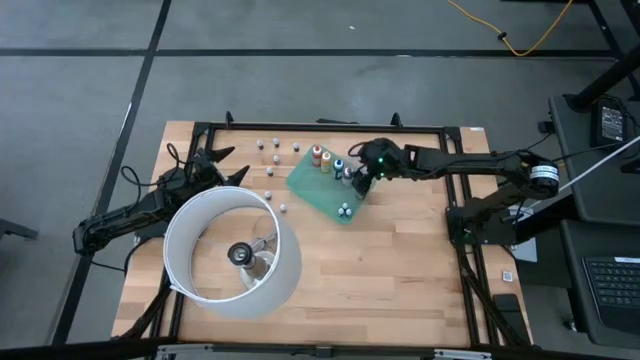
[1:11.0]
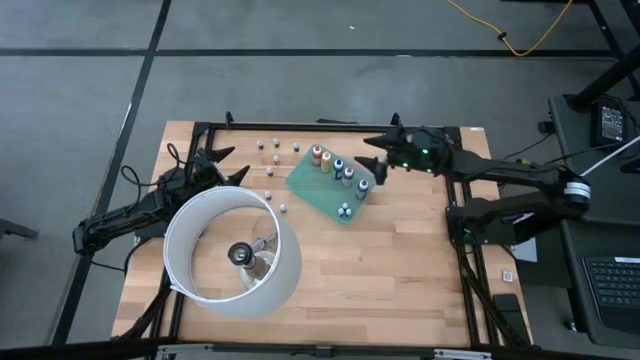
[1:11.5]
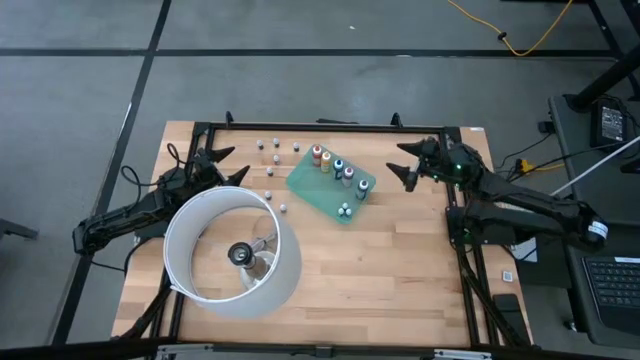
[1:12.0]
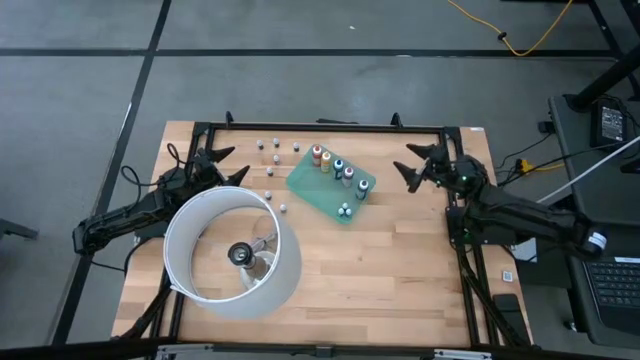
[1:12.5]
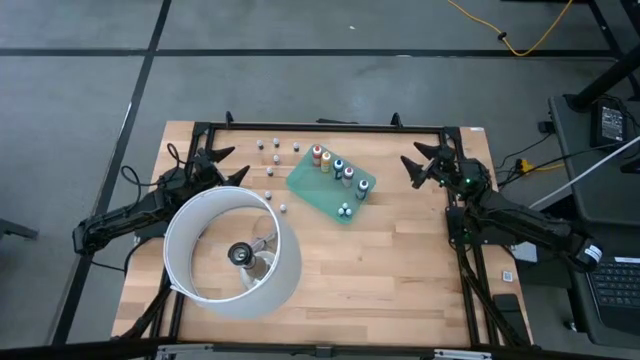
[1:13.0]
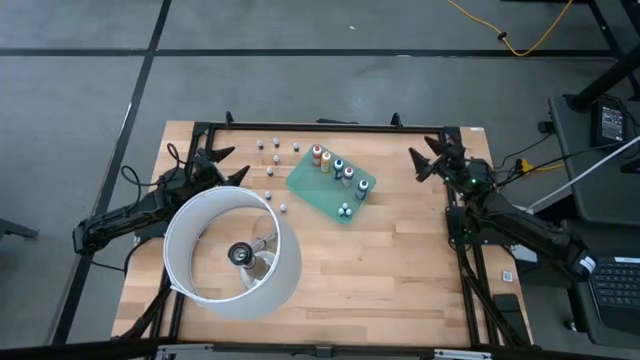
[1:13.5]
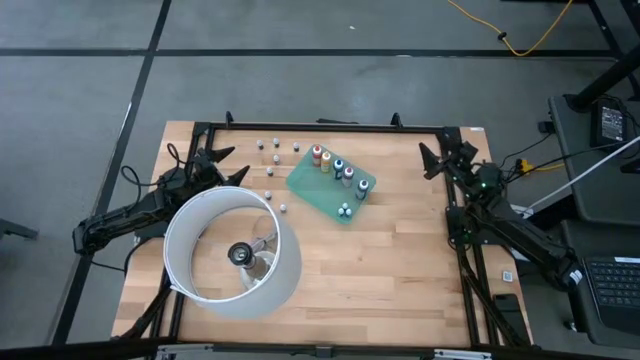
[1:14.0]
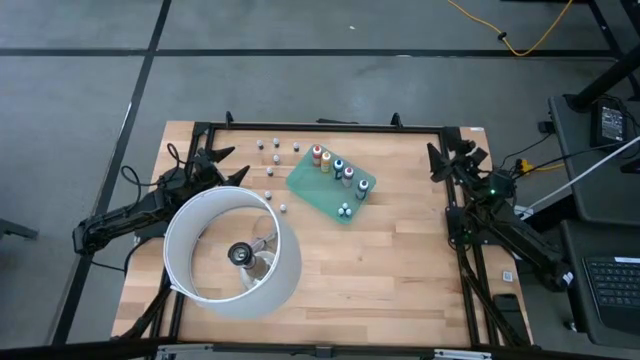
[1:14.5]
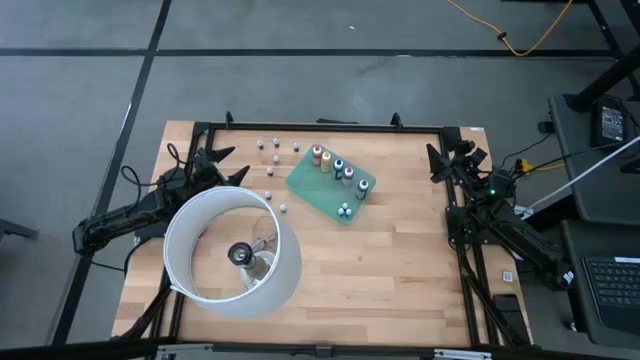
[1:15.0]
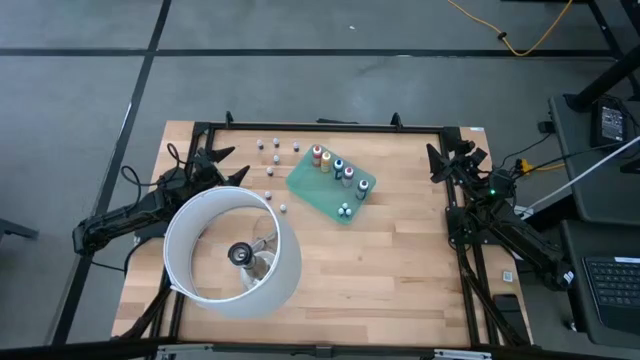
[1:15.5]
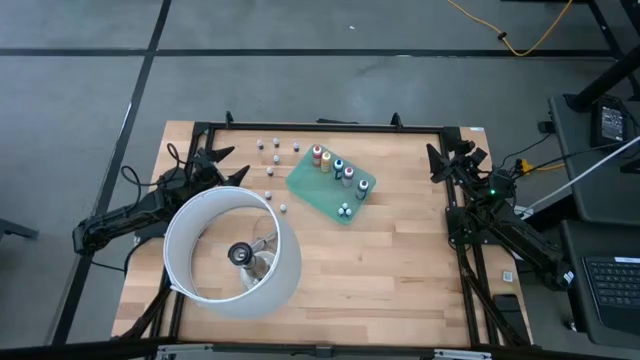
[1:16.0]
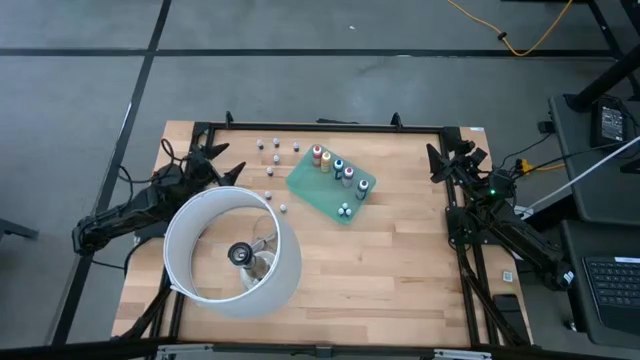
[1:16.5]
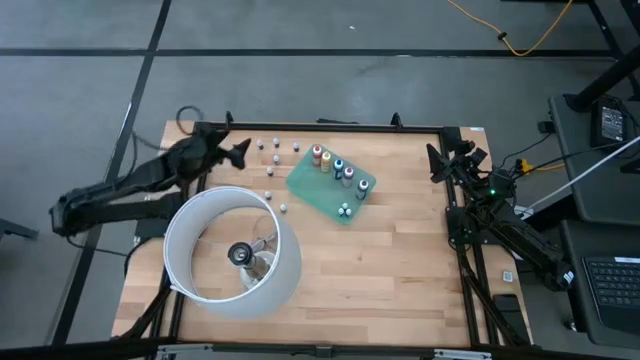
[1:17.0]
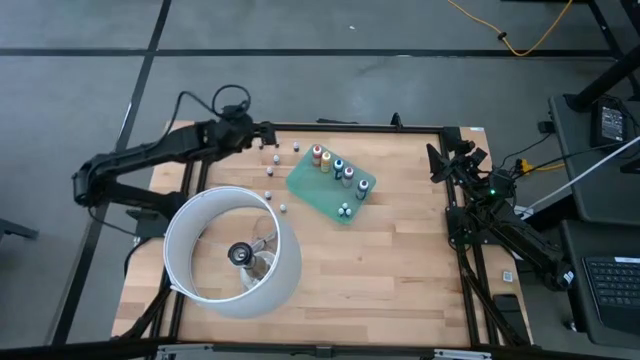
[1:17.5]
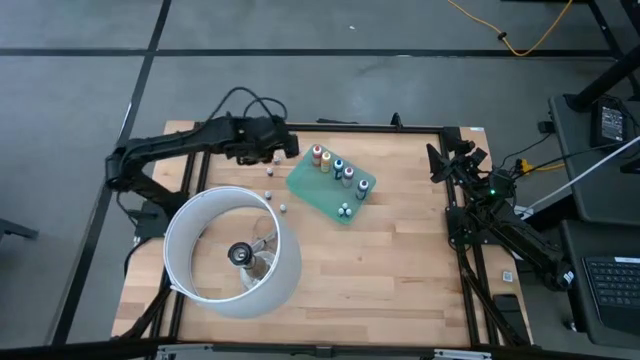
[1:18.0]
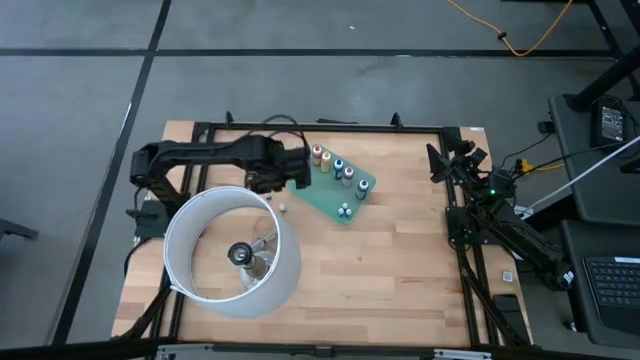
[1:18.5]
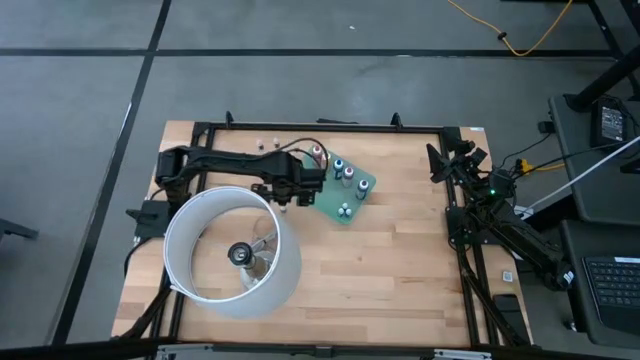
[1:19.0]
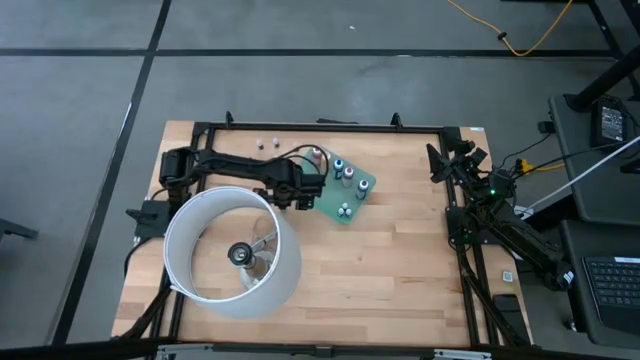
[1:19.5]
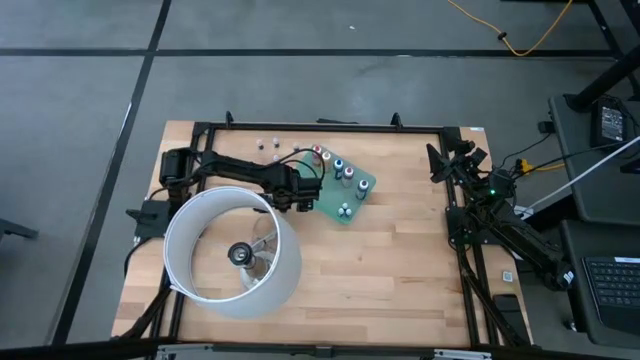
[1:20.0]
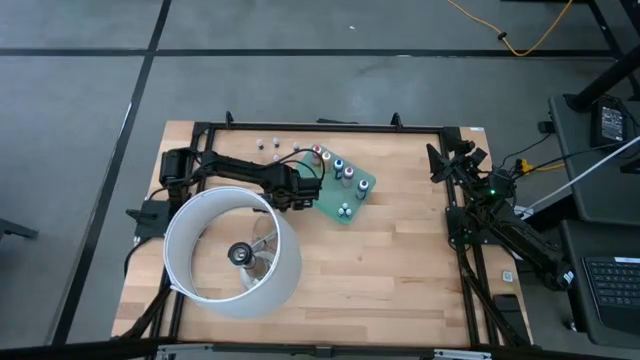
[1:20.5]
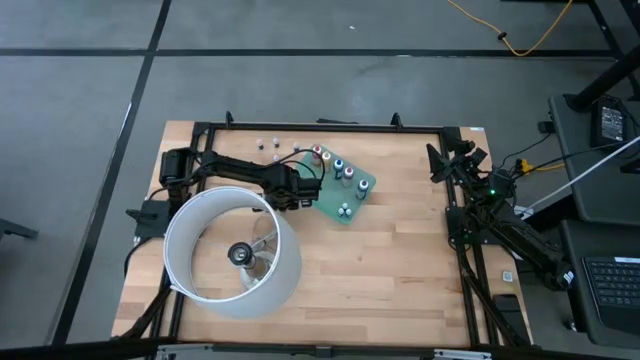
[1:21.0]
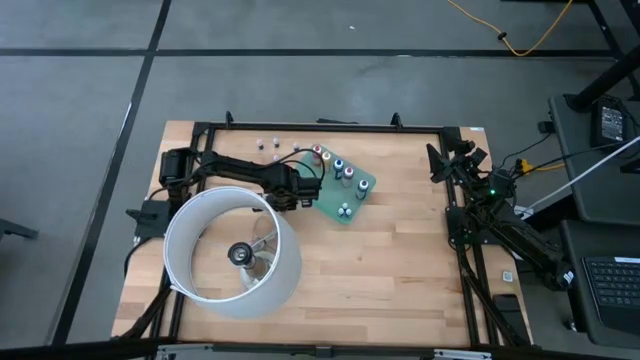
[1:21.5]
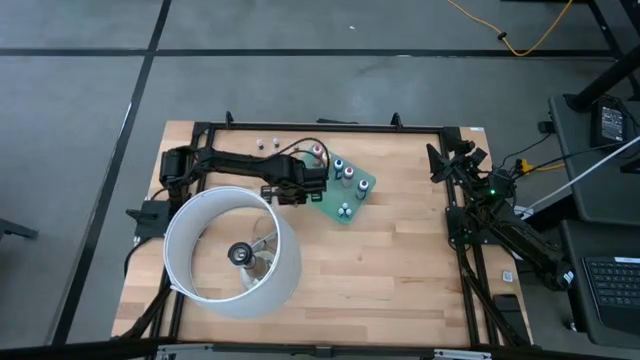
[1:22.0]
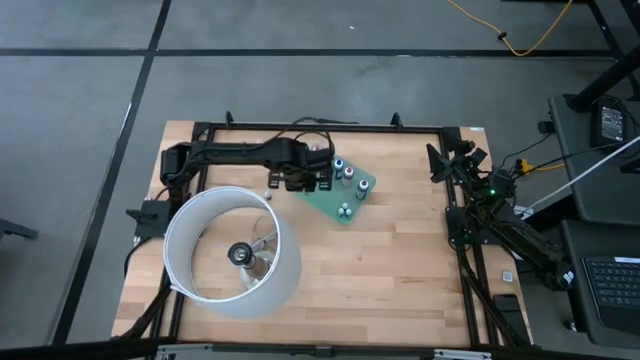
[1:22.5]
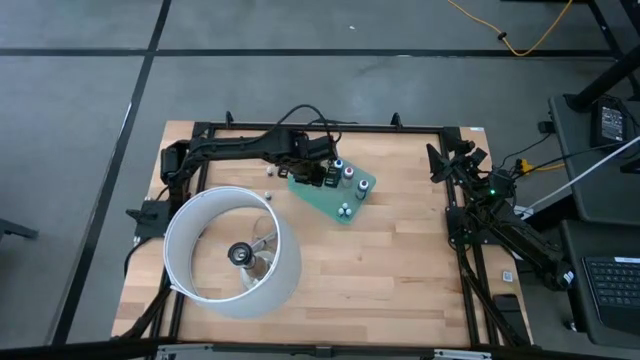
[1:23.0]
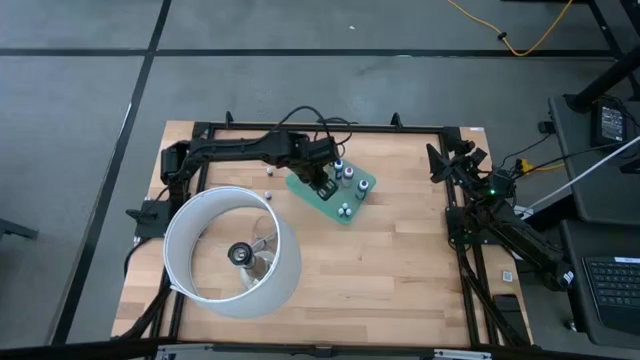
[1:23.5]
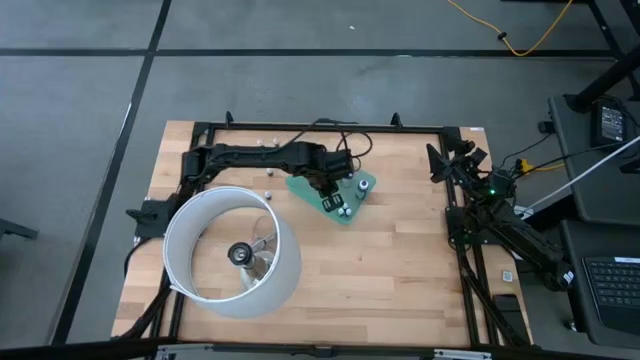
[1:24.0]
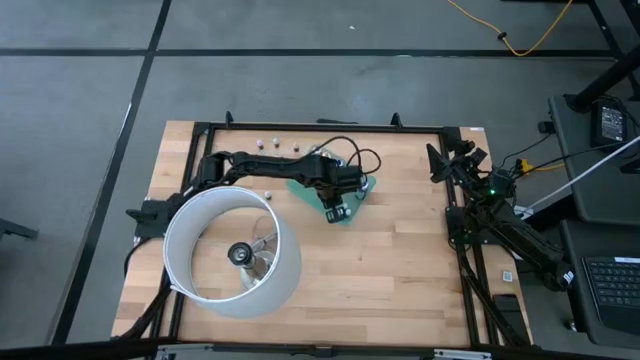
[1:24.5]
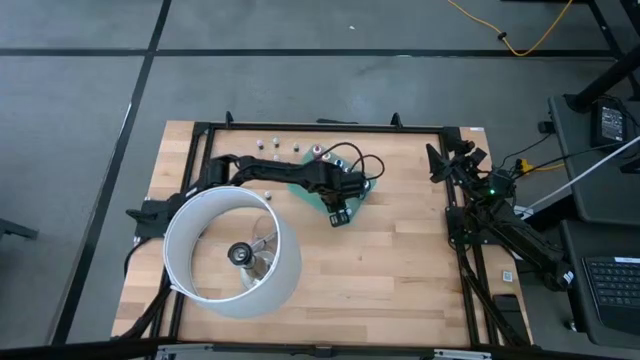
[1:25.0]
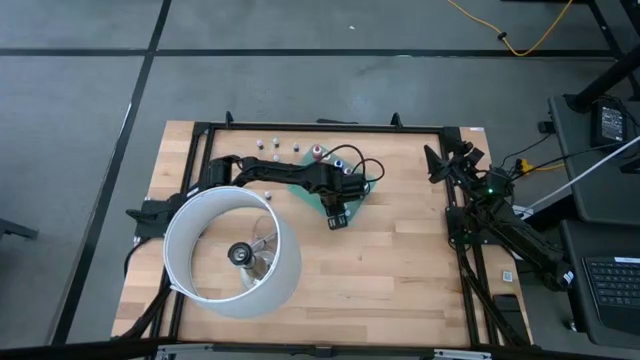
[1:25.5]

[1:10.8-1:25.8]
Task: Pick & Place food coloring
Put the small black food coloring bottle into the green bin

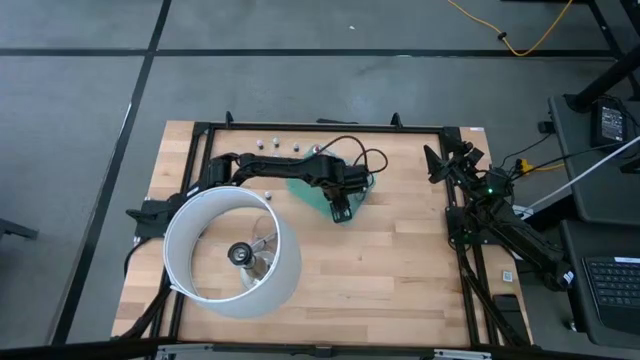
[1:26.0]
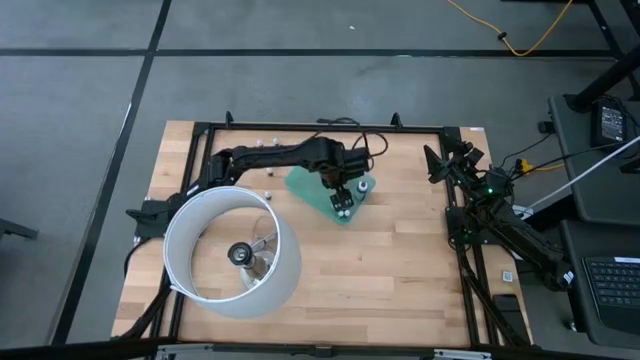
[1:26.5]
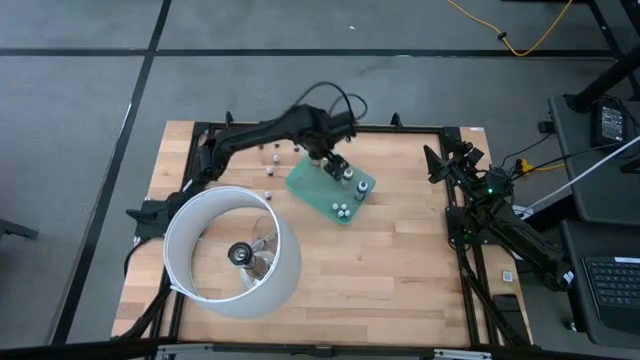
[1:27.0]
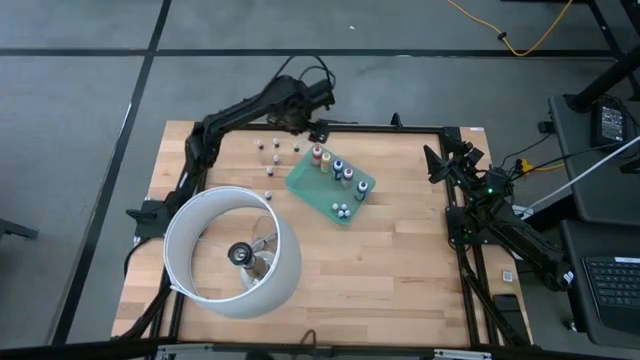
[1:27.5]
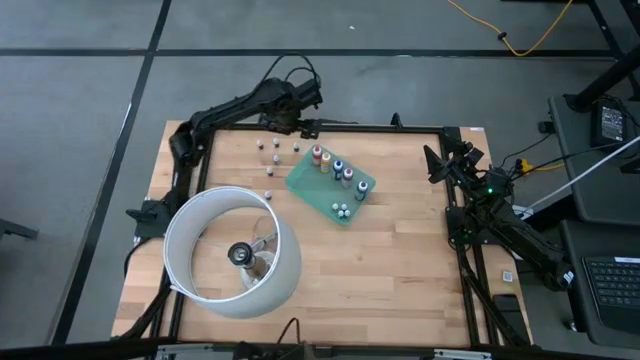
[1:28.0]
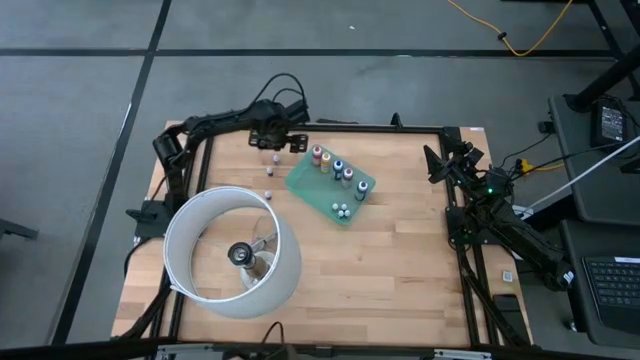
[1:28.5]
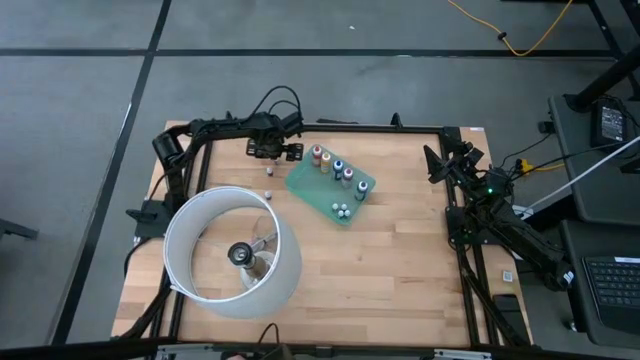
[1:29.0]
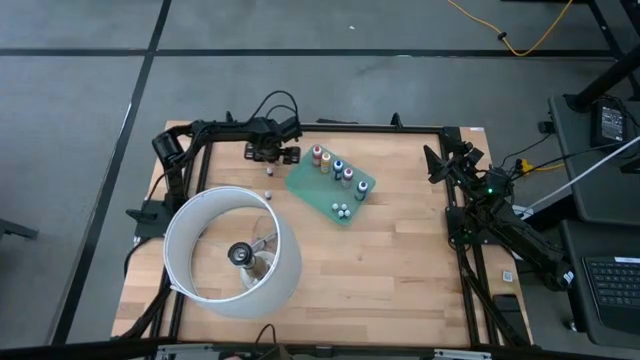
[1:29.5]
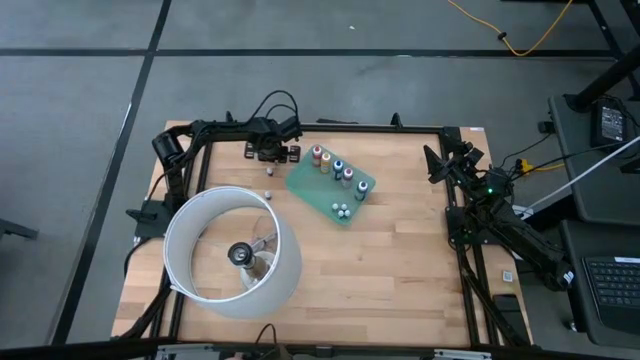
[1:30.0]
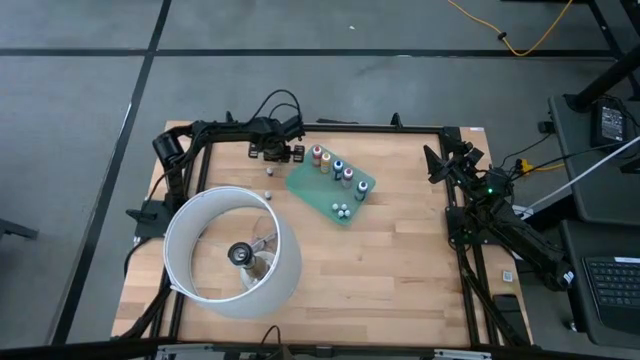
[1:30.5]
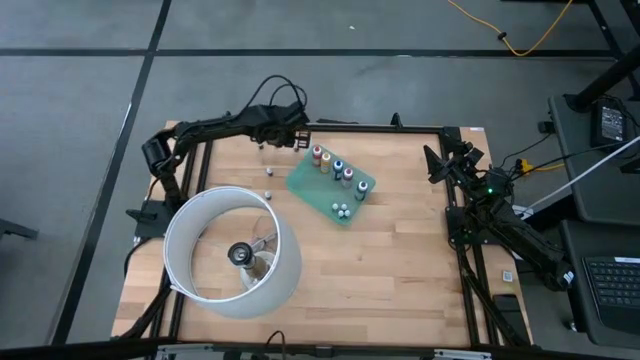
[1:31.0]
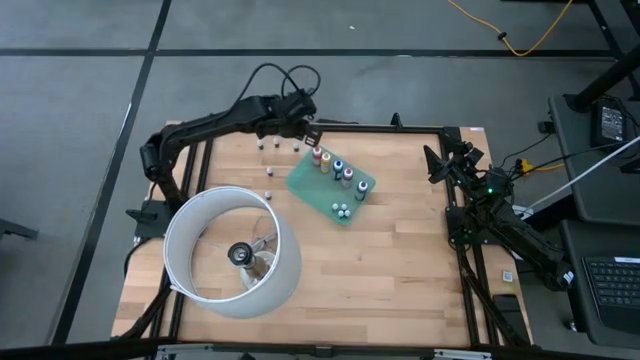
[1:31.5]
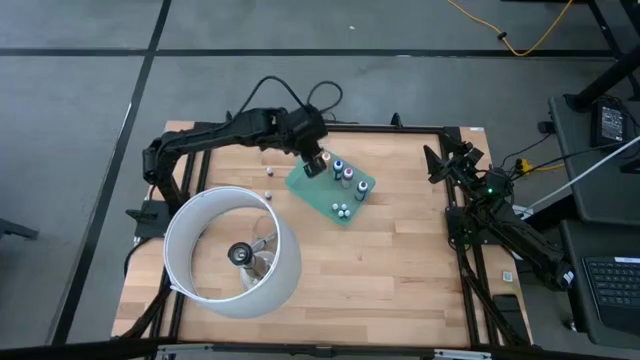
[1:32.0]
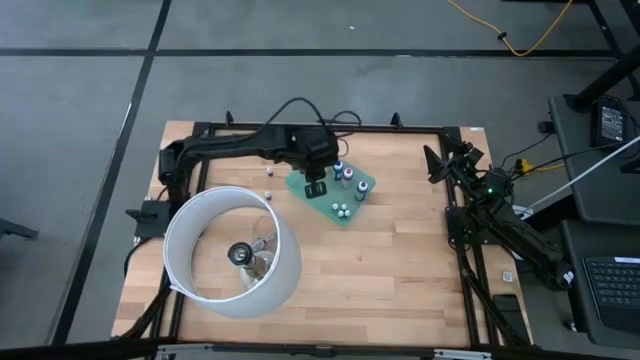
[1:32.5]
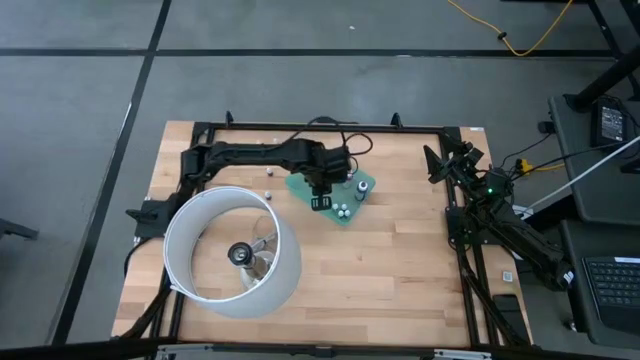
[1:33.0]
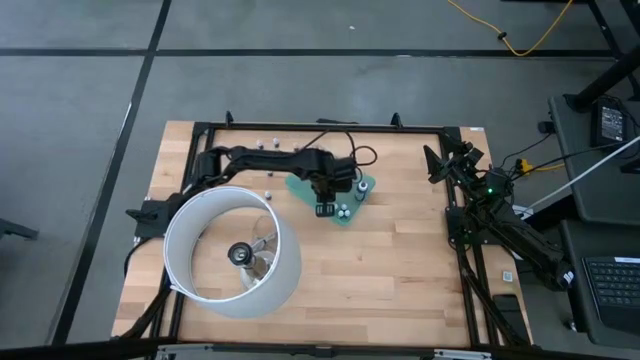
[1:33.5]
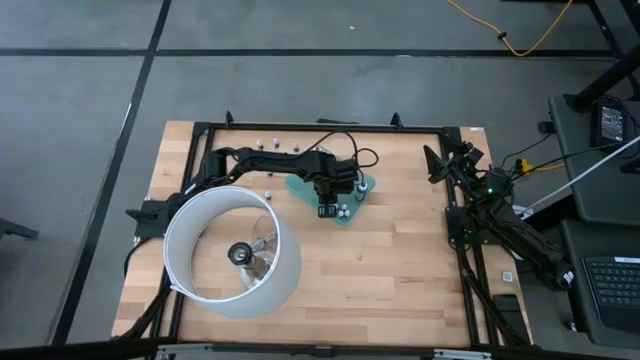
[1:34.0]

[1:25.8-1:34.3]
Put the small black food coloring bottle into the green bin
